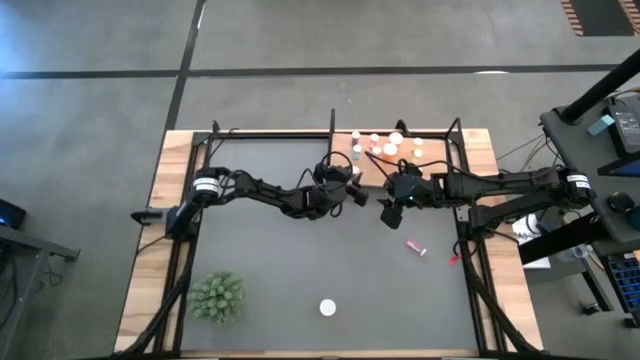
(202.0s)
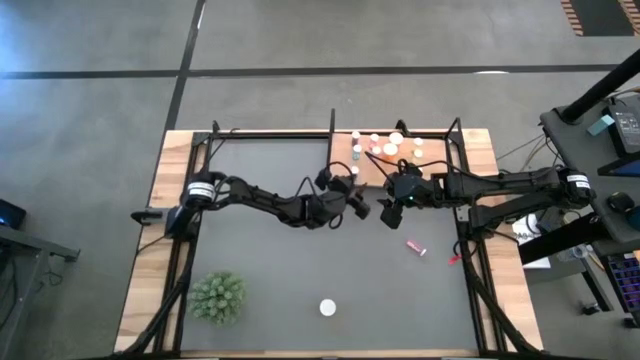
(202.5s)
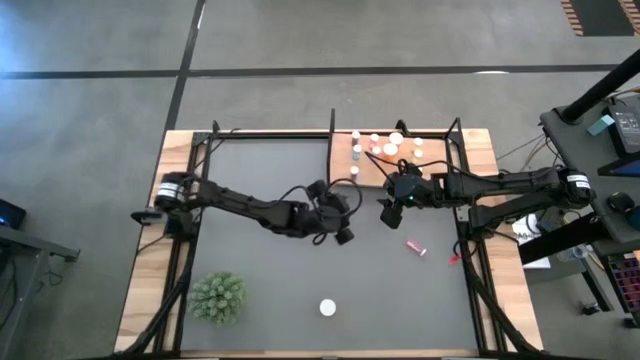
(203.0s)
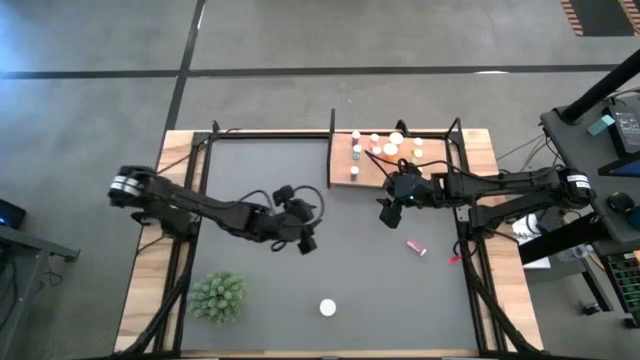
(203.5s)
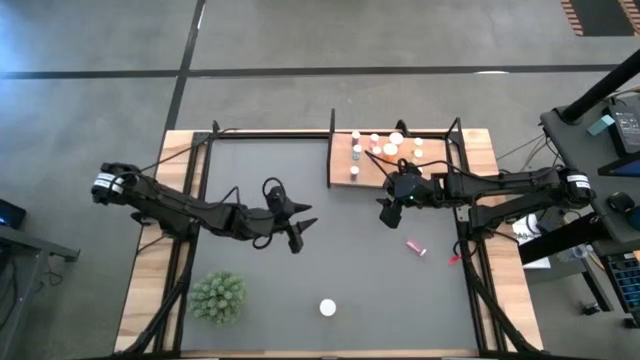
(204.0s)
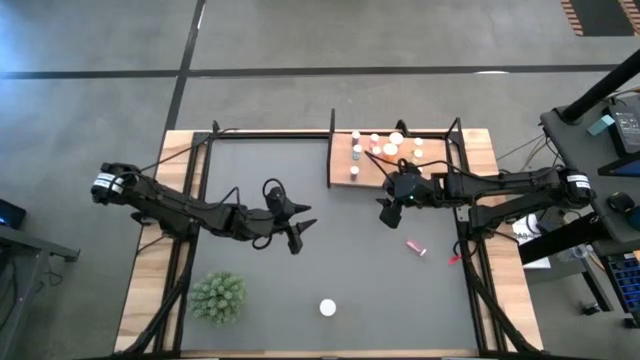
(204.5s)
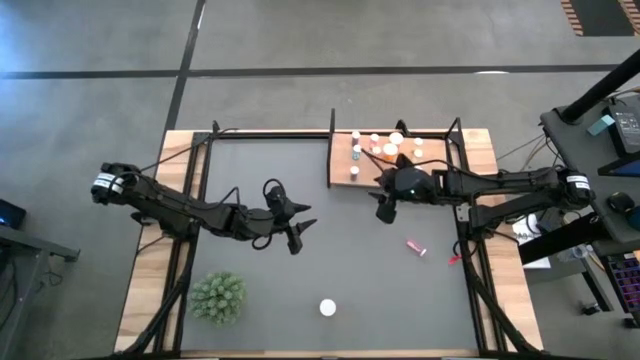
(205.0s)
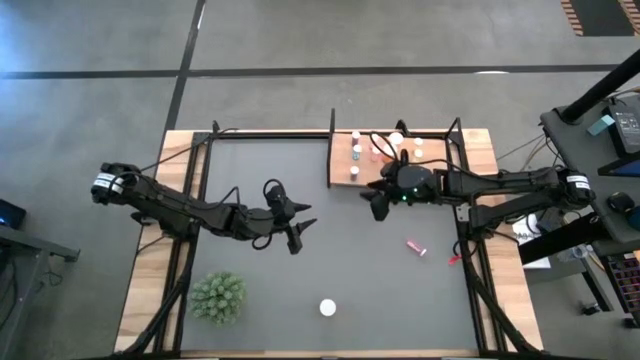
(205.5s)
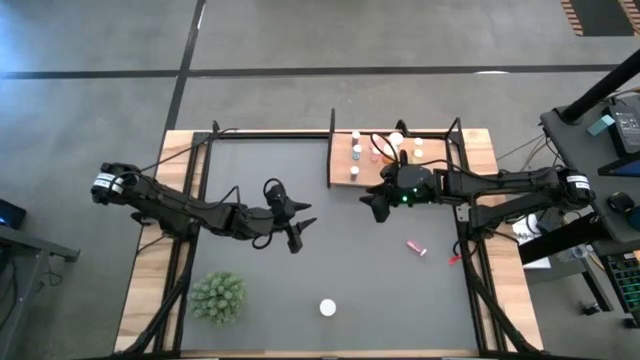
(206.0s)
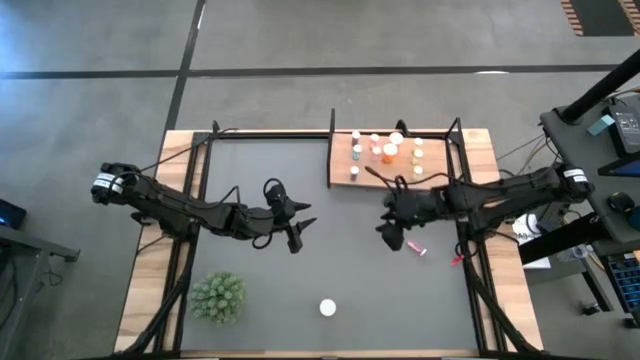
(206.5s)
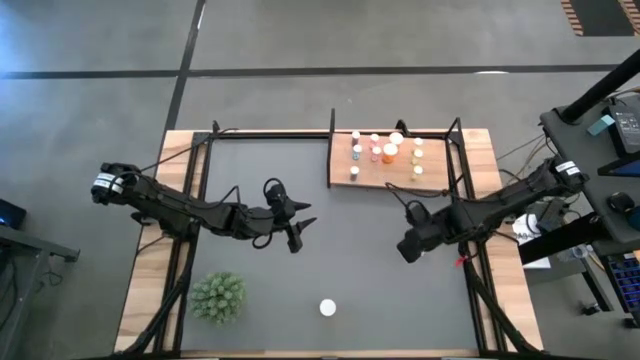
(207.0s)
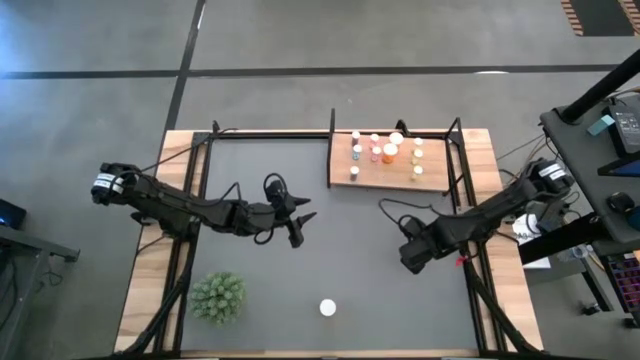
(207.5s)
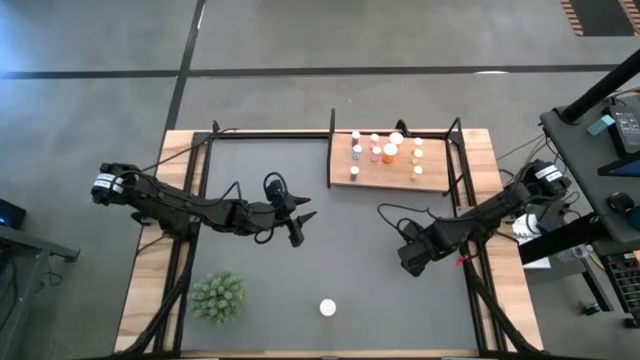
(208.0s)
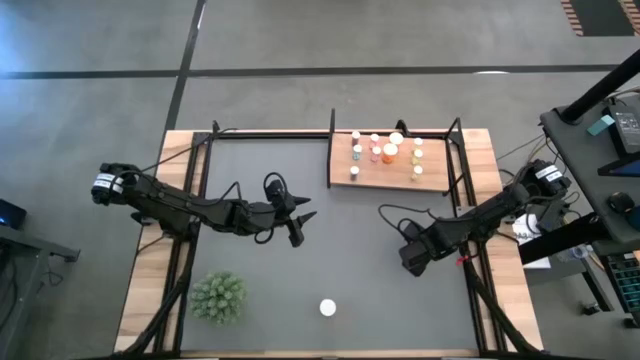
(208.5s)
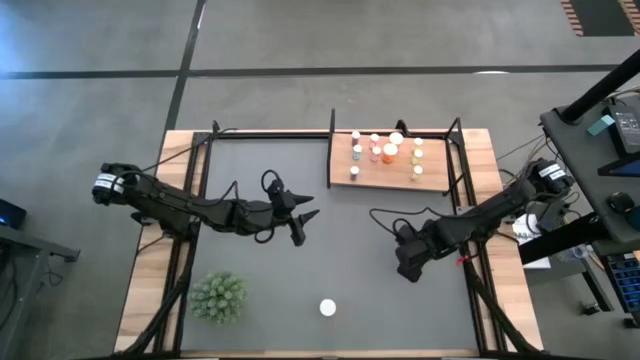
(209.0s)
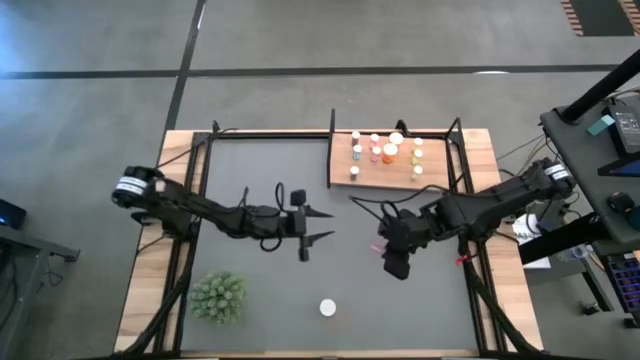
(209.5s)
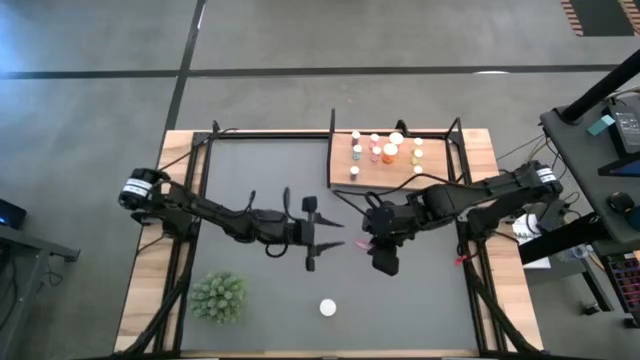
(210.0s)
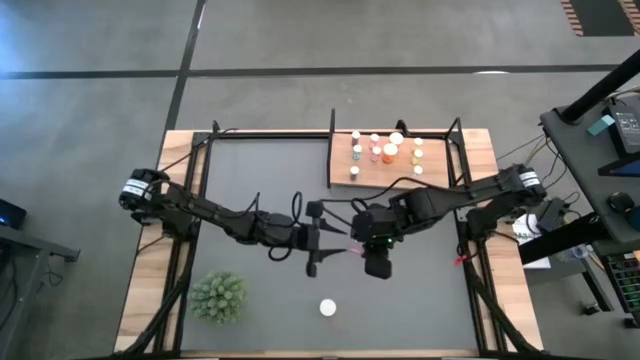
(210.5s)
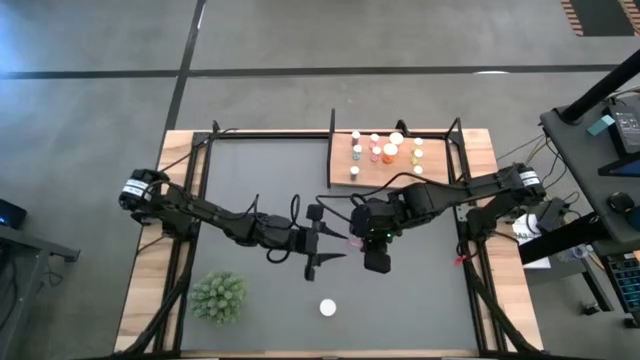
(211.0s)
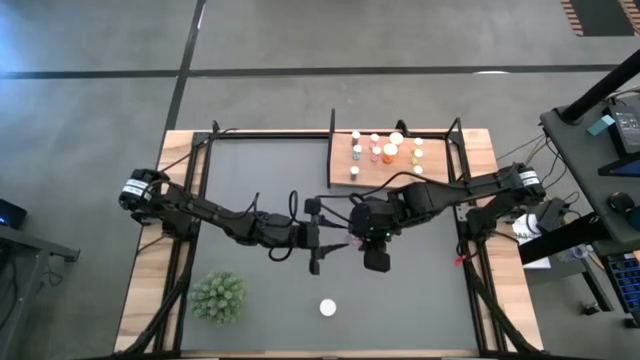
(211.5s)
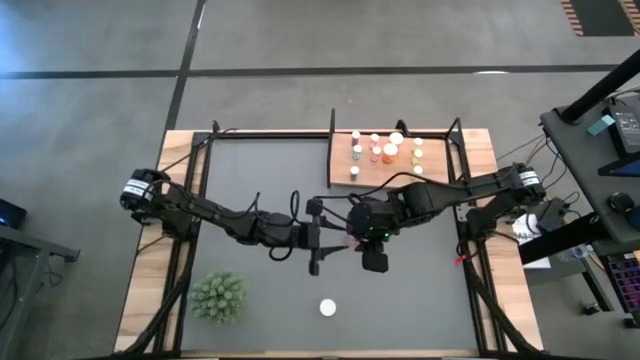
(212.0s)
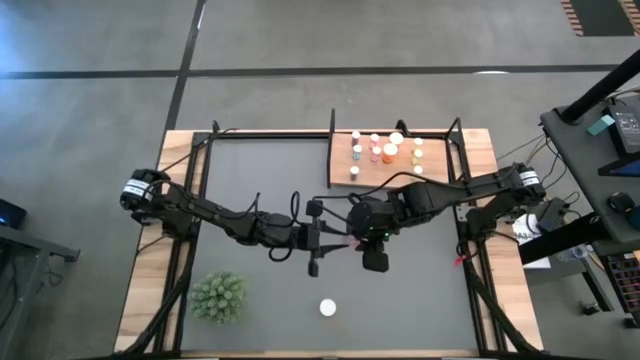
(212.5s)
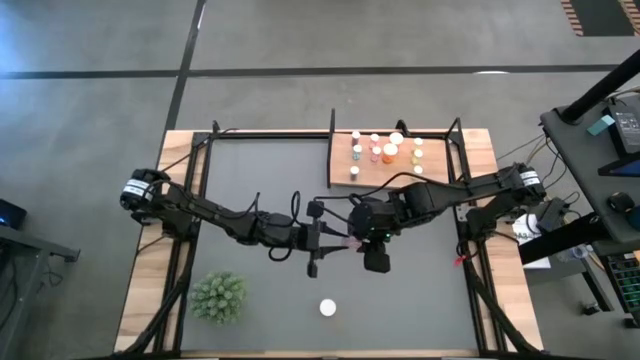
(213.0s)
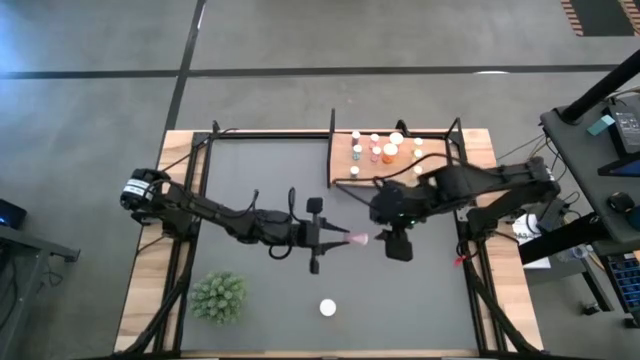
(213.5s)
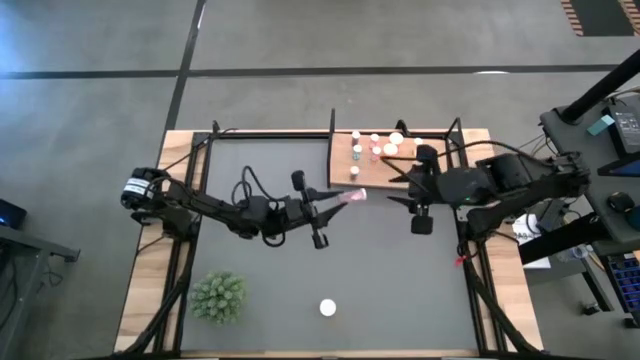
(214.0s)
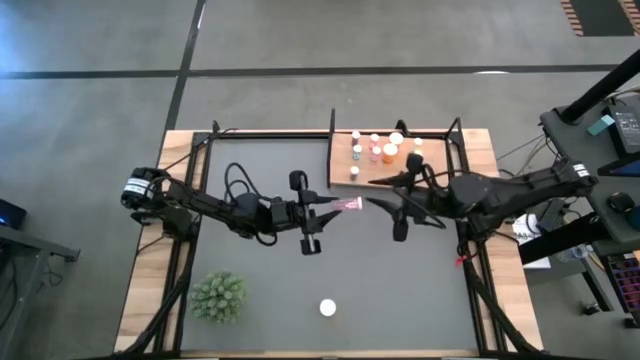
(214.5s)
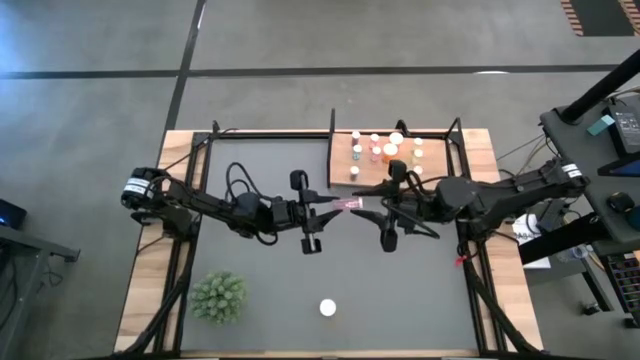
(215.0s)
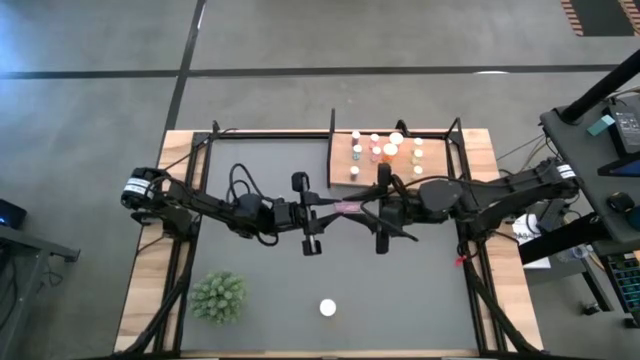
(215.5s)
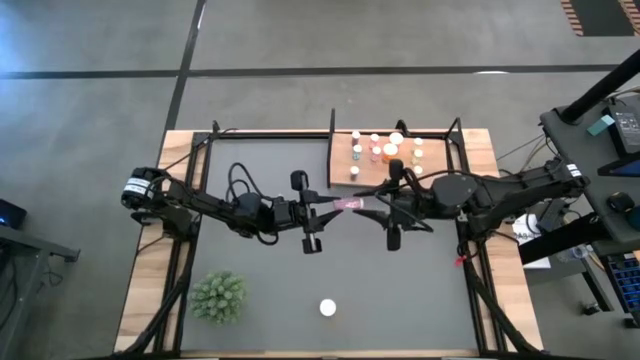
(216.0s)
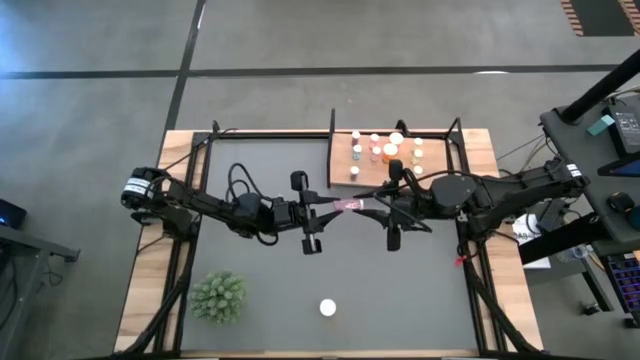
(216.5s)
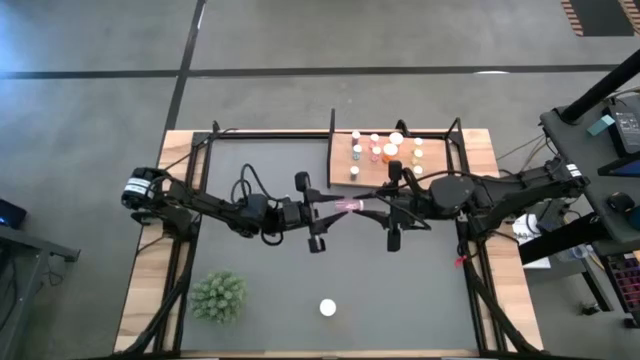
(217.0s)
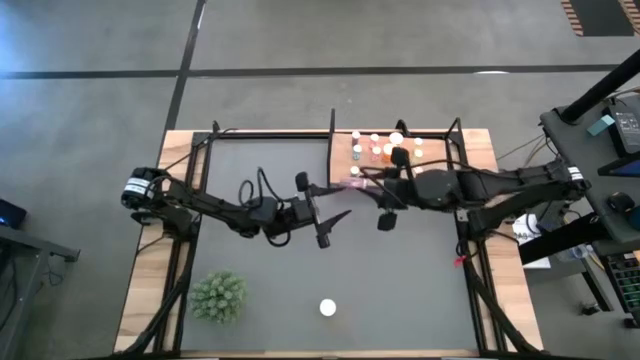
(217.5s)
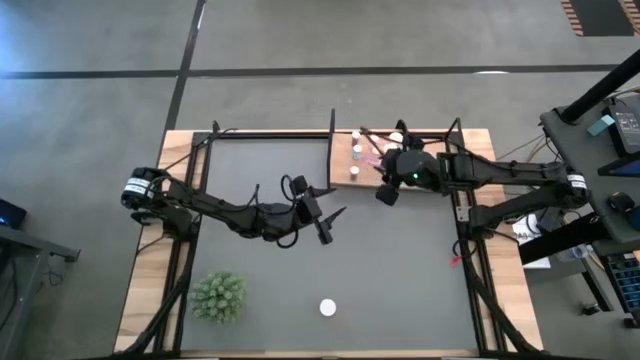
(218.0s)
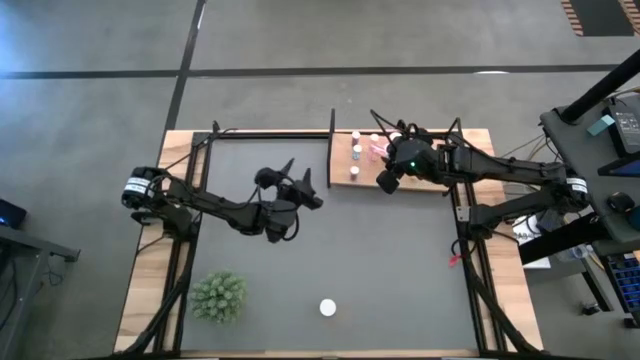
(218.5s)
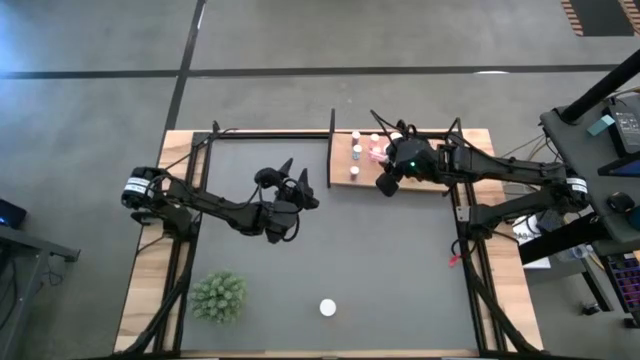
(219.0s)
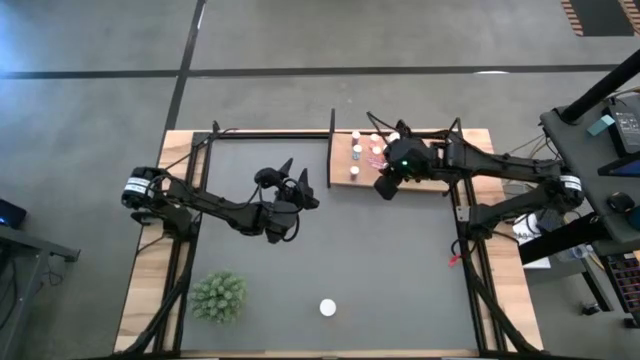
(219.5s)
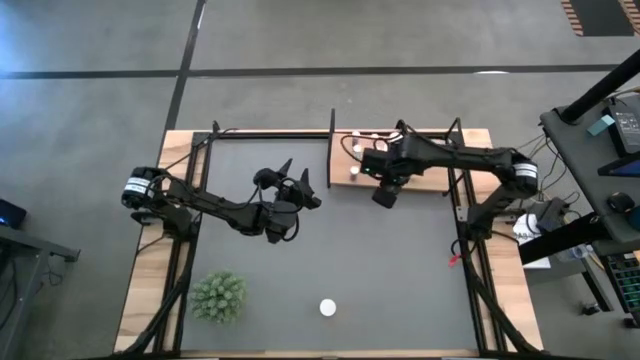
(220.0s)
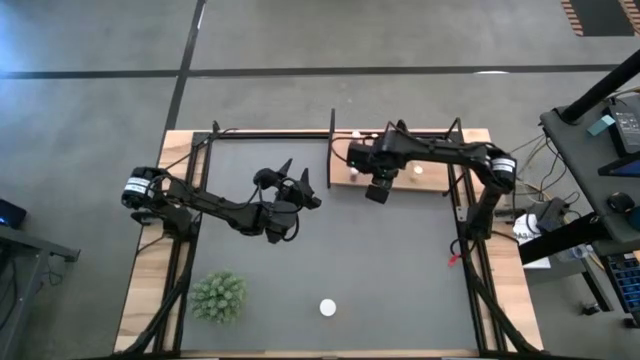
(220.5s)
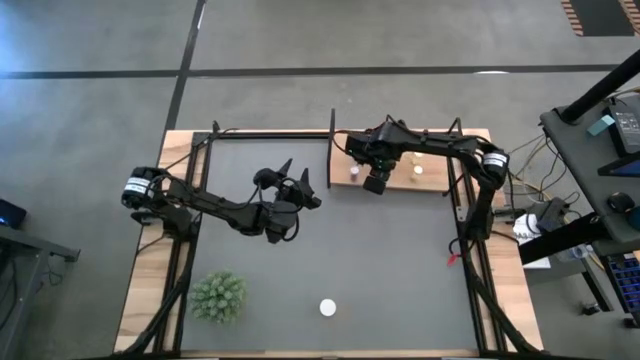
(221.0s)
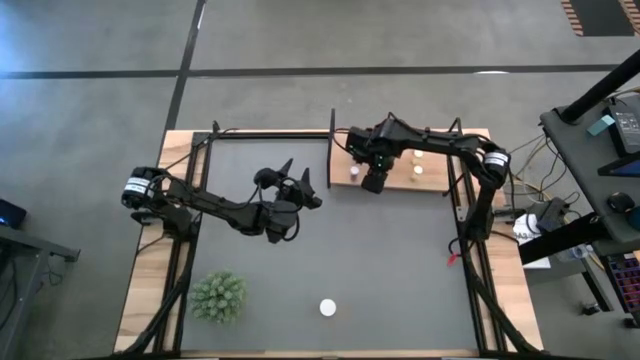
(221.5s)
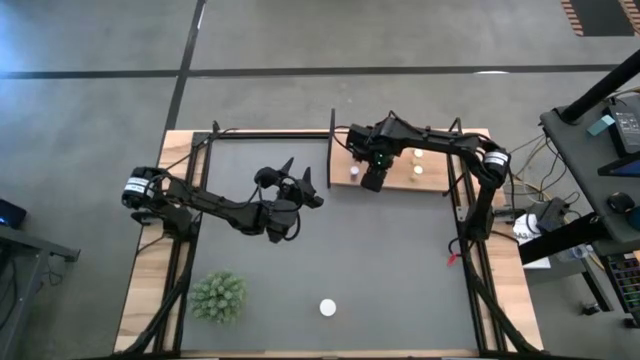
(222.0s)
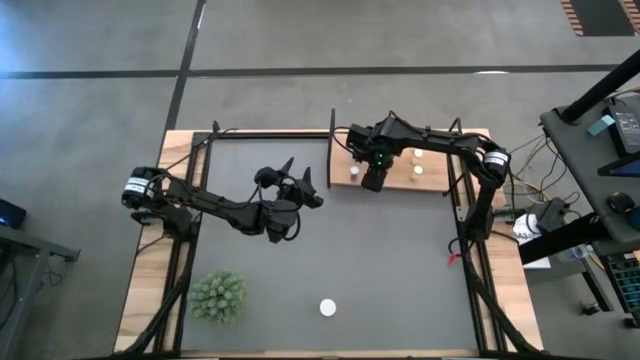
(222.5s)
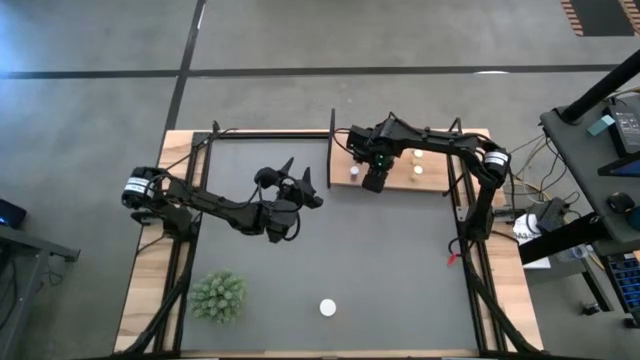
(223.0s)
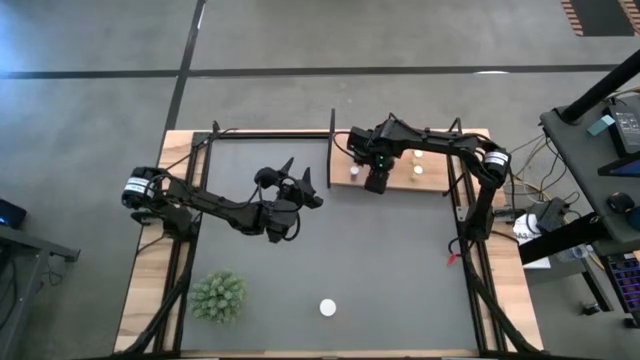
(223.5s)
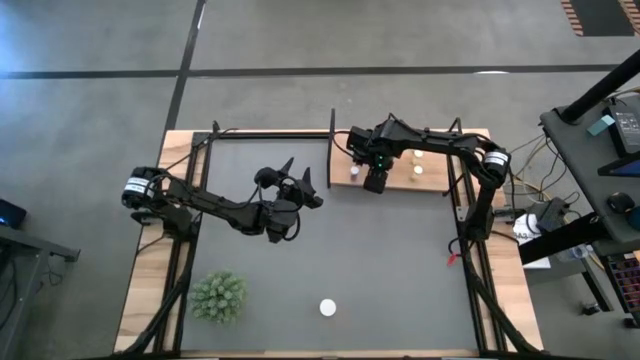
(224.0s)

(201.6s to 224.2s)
Task: Pick and place medicine bottles onto shelf by color
Put the pink pill bottle on the shelf aligned with the other pink pill bottles
